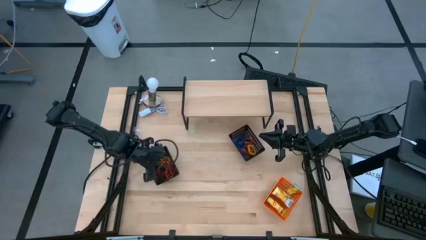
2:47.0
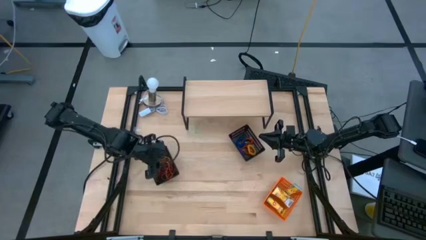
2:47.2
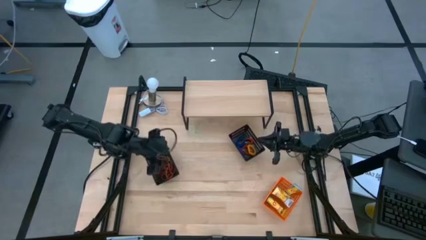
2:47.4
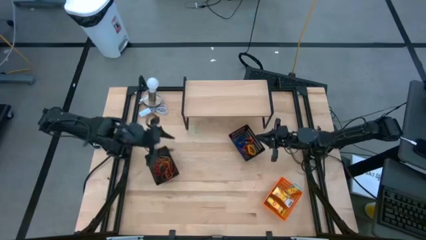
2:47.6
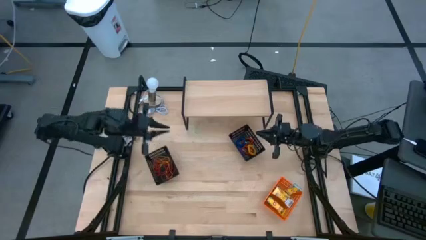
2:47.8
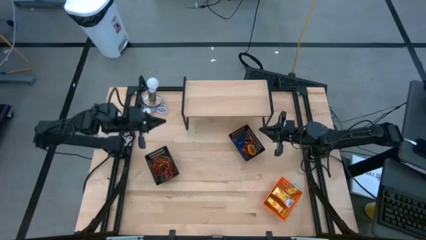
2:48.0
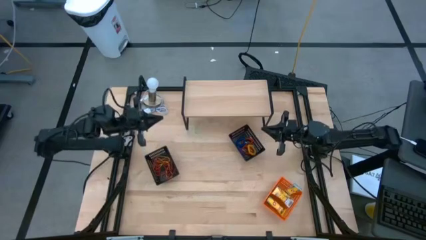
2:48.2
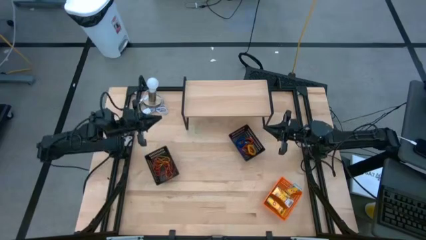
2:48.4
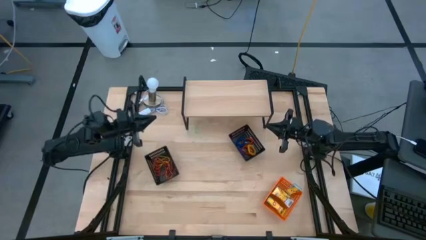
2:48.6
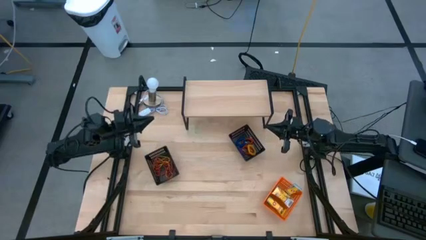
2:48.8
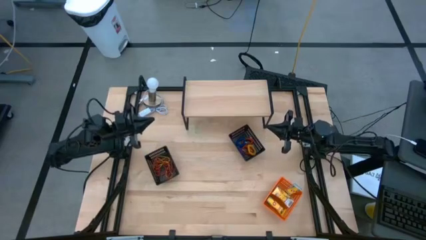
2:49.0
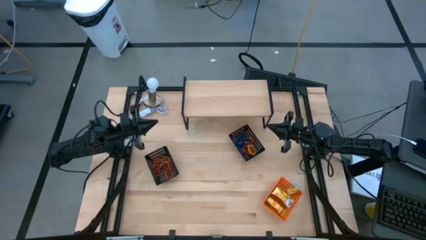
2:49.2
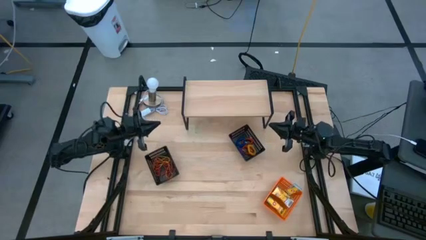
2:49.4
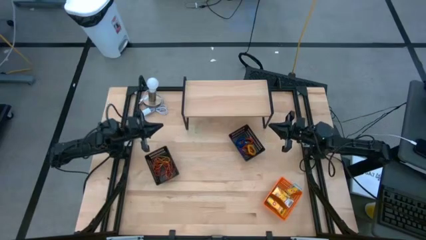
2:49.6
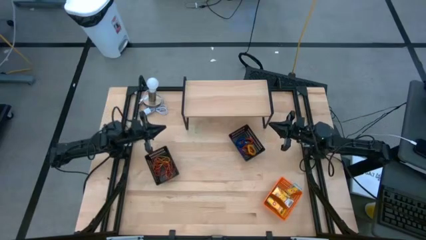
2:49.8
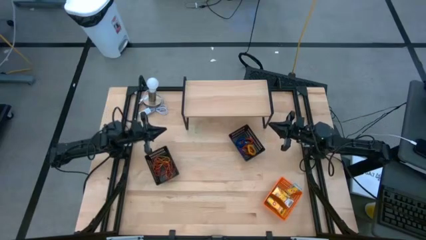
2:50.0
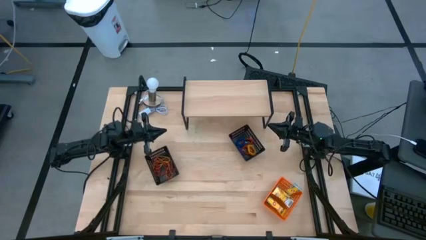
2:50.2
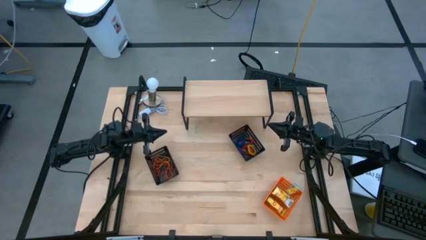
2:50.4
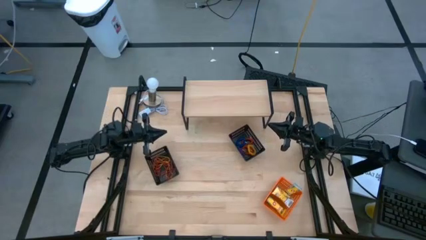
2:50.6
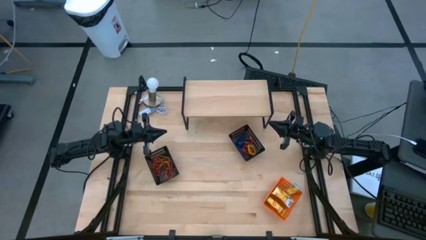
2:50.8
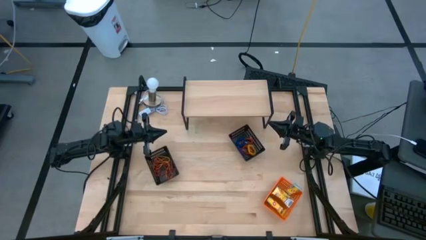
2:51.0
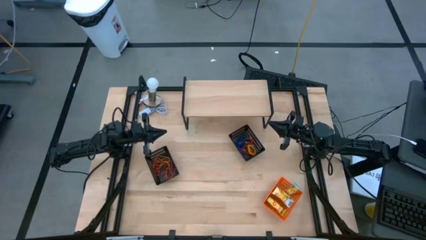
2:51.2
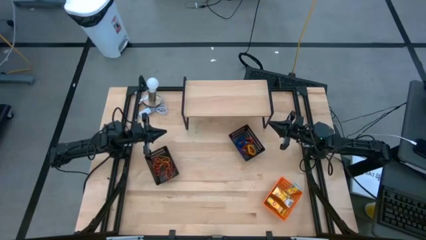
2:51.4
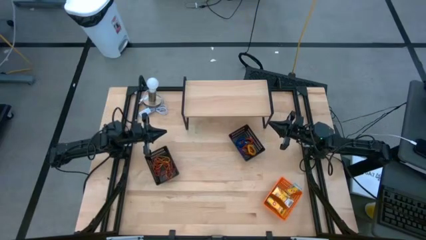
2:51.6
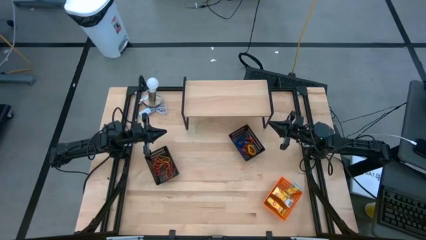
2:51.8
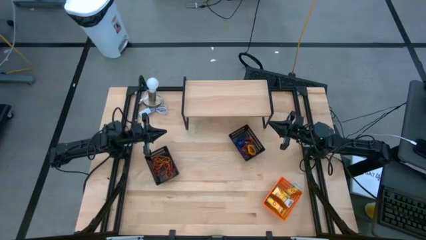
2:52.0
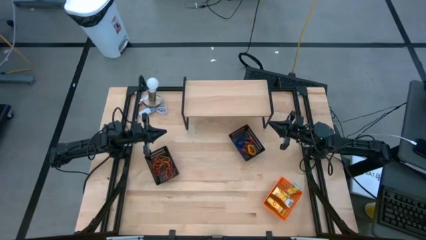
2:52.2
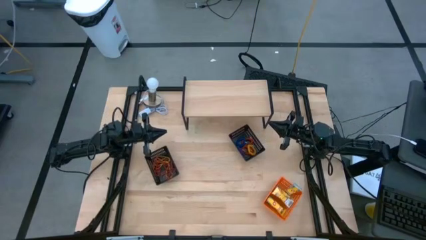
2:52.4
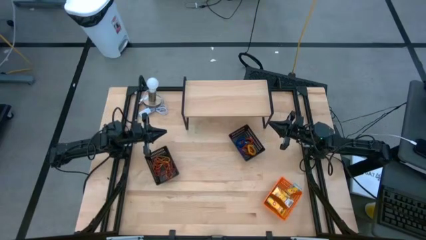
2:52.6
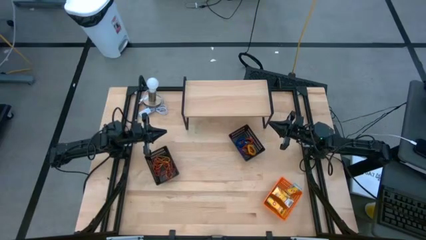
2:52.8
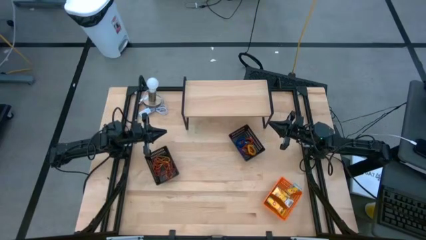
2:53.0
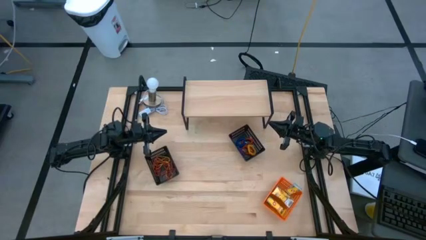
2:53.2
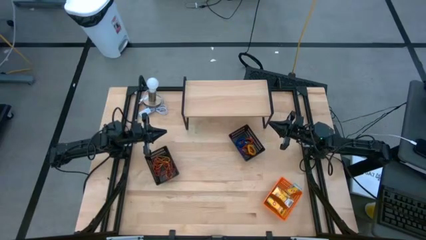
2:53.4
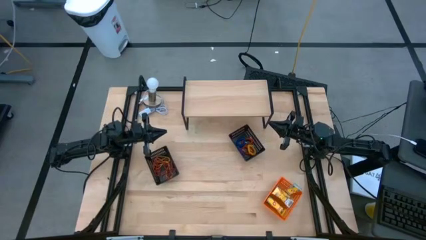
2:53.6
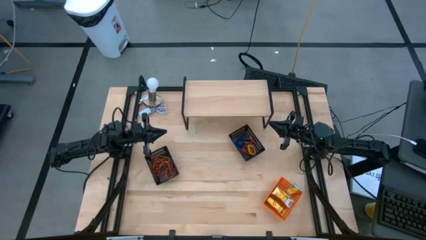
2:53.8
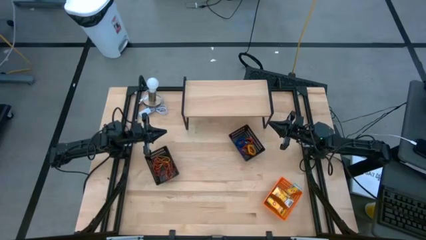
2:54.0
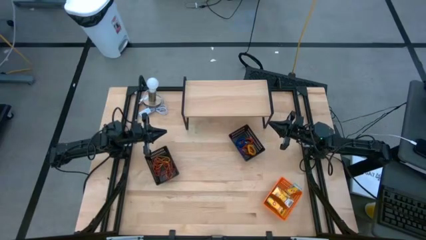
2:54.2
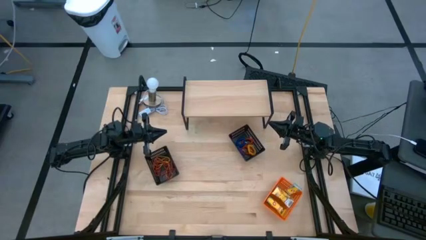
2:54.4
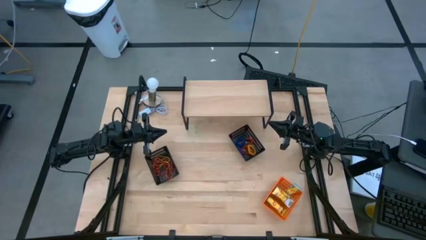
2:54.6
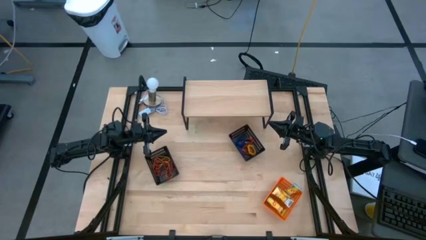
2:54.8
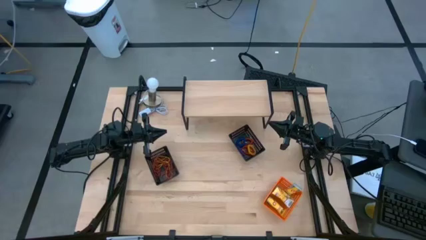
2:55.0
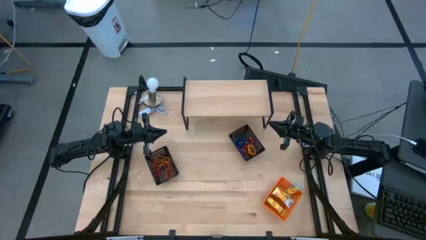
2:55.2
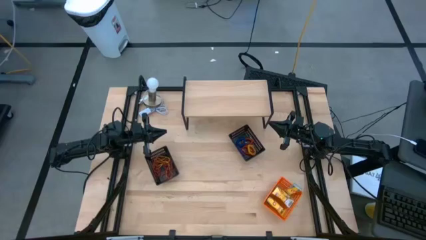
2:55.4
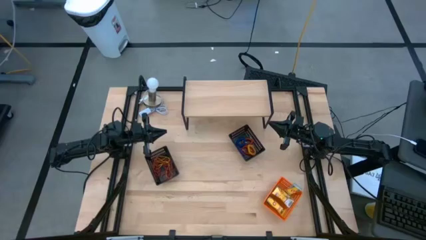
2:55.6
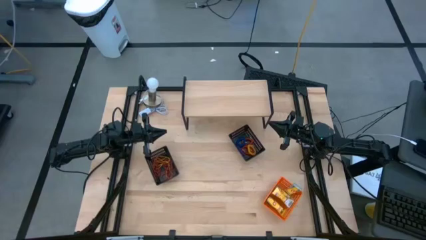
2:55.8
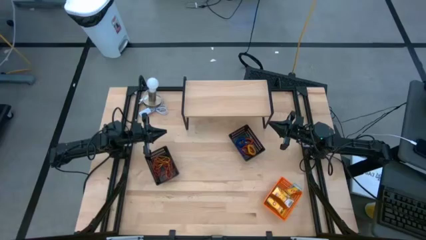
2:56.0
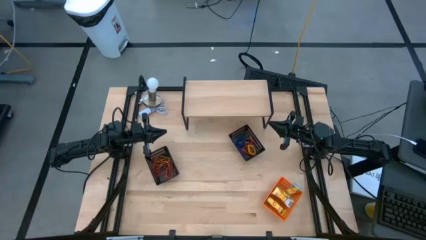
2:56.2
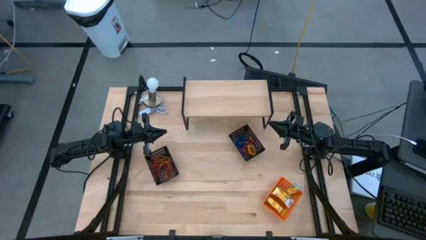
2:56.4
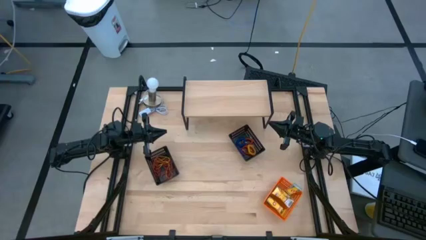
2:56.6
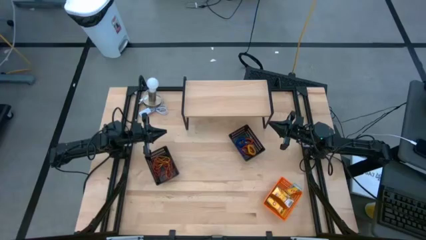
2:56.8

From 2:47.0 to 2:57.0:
Task: Pick & Place Office Desk Supplies
Return to Home Position
